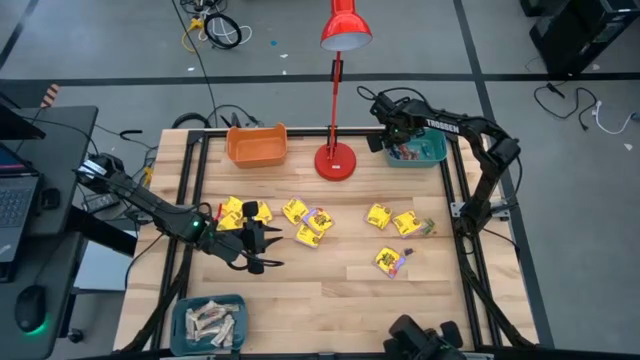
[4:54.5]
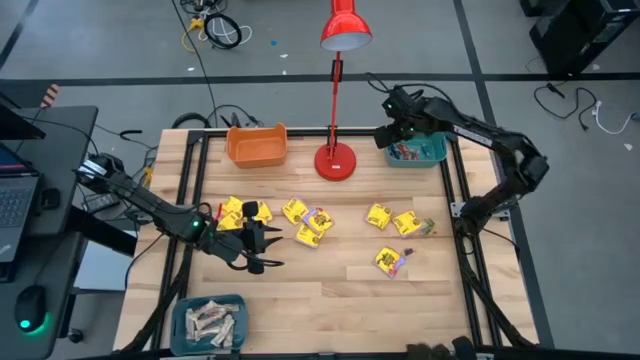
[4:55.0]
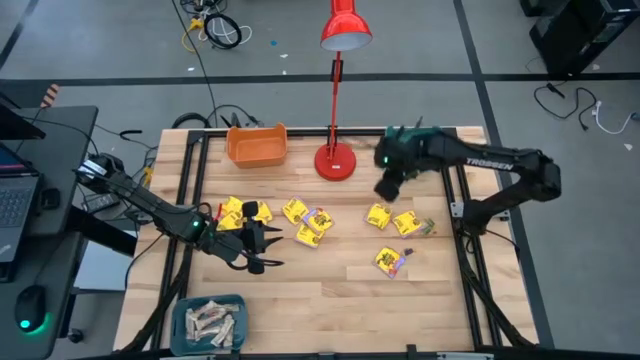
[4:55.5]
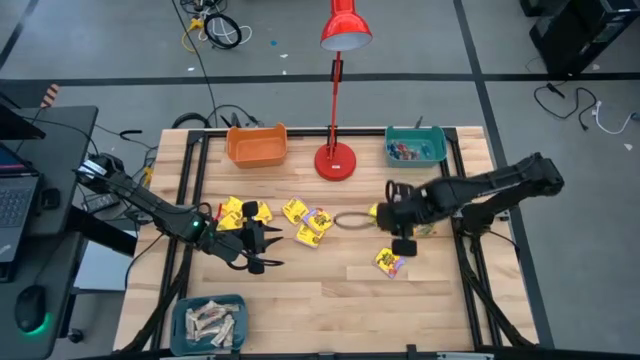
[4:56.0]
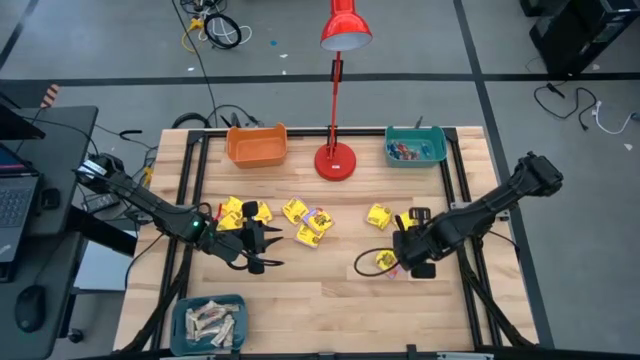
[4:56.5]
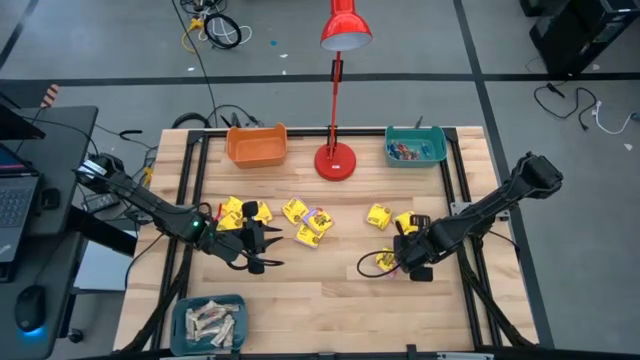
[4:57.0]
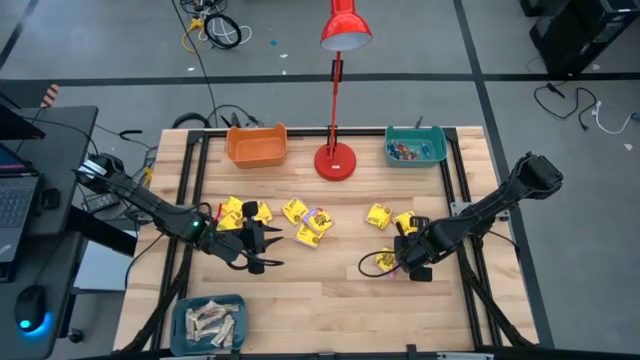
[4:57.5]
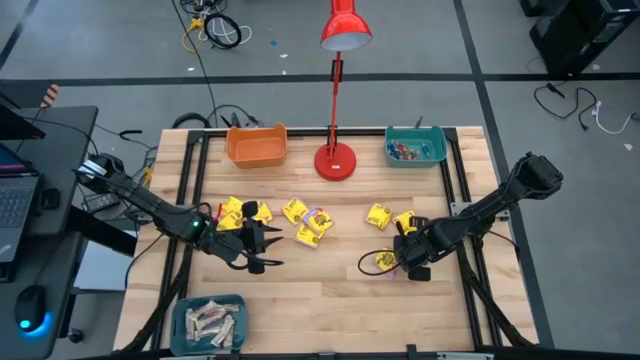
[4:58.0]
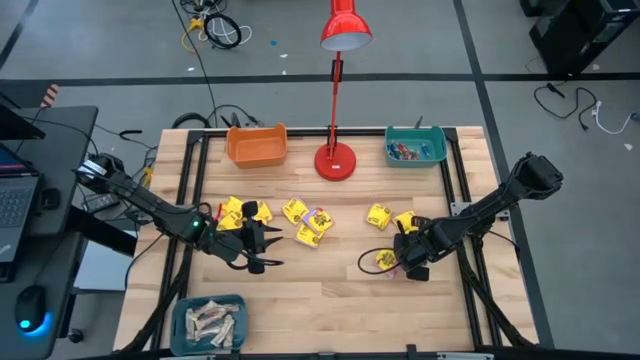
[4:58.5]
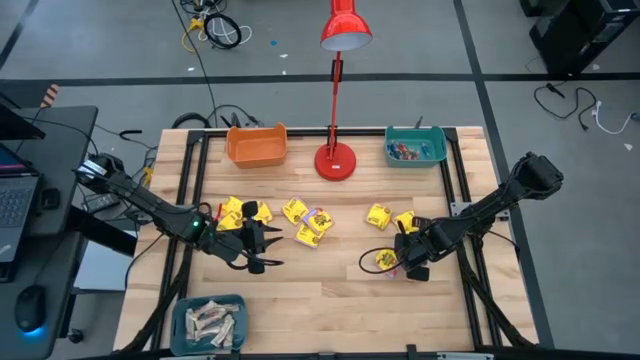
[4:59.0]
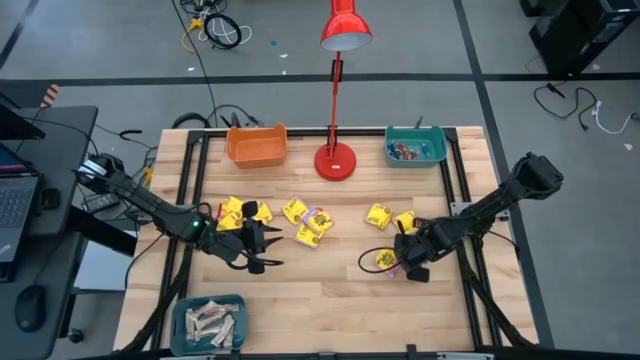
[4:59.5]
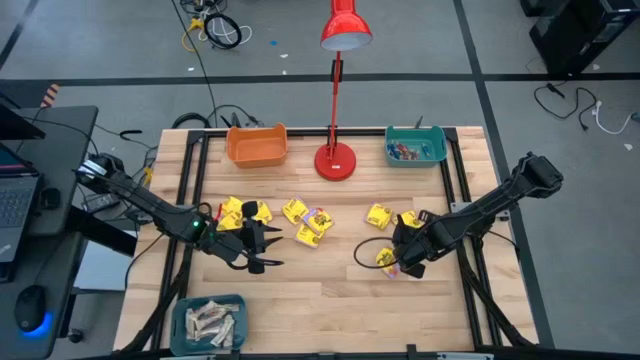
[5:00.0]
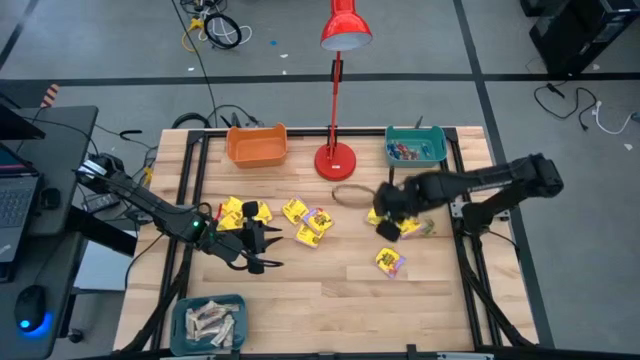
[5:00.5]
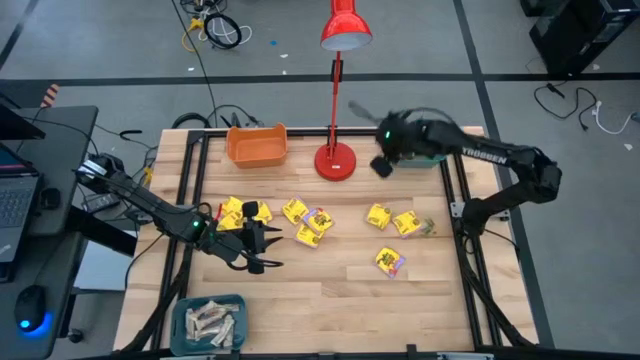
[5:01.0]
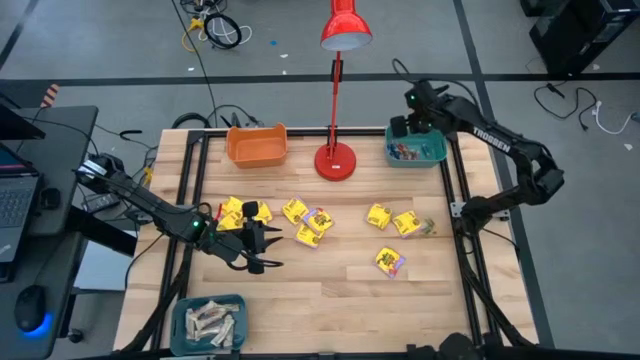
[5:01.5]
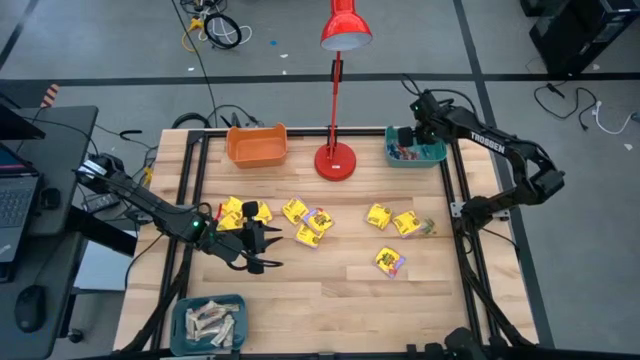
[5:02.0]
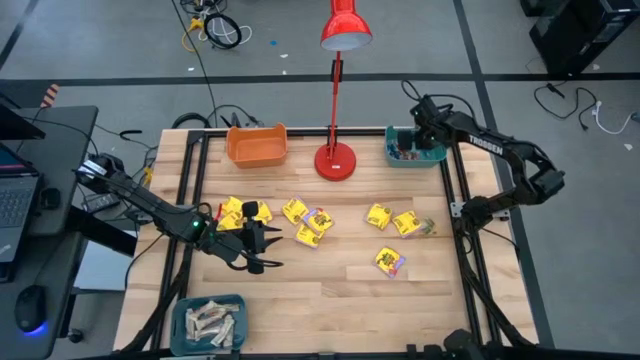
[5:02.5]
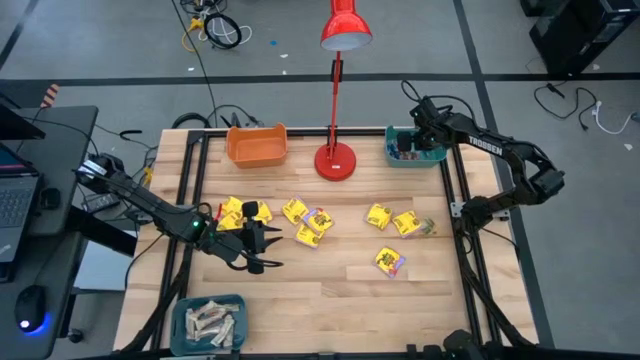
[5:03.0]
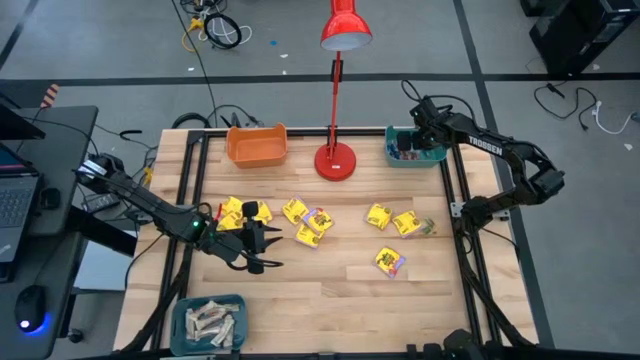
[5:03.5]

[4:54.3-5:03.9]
Task: Sort candy
Put the small violet candy into the green bin

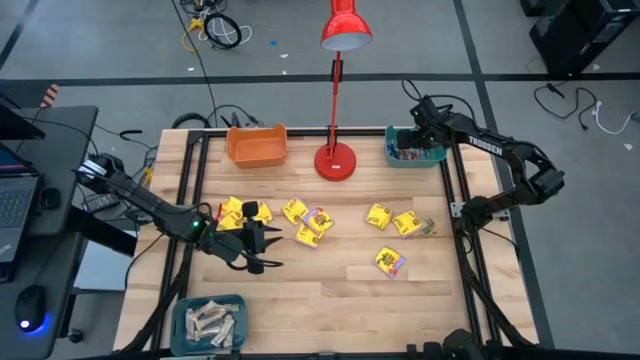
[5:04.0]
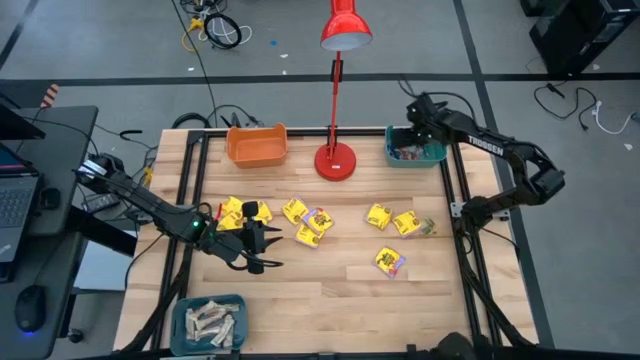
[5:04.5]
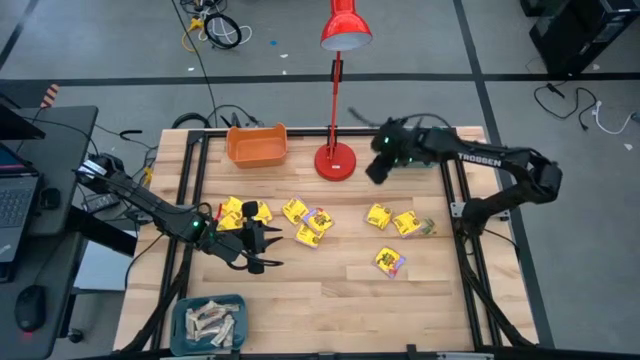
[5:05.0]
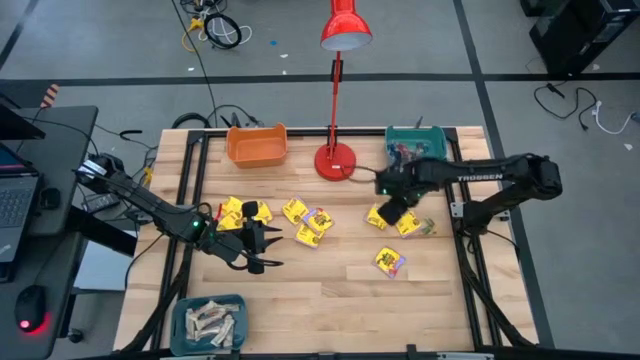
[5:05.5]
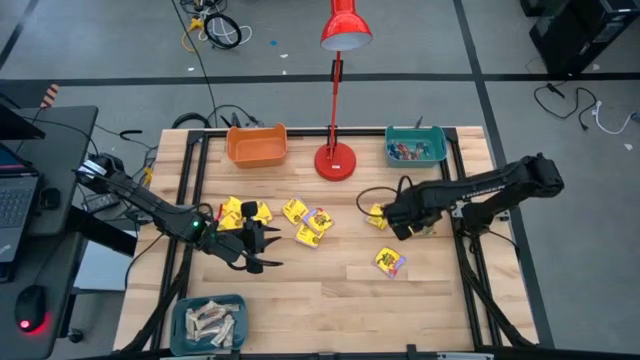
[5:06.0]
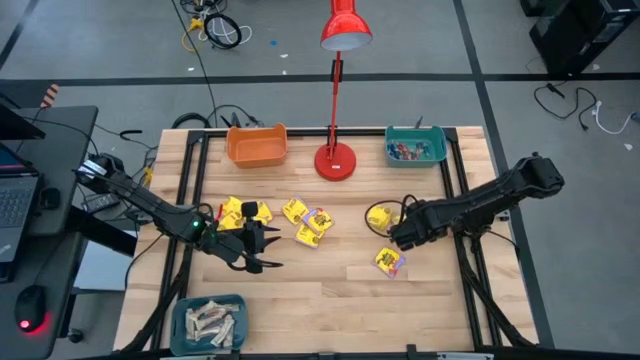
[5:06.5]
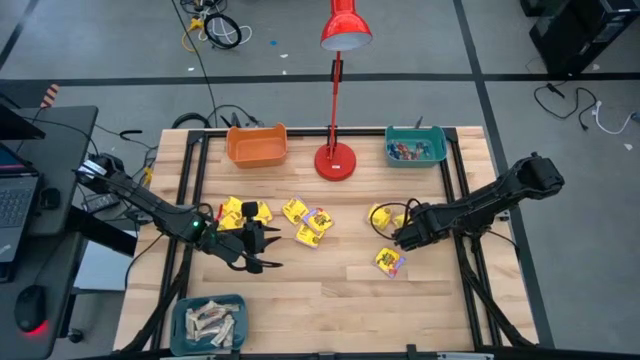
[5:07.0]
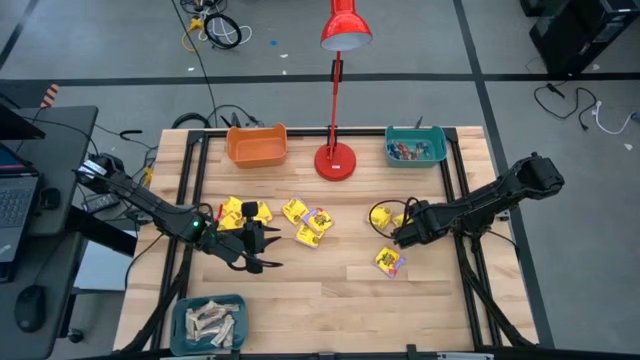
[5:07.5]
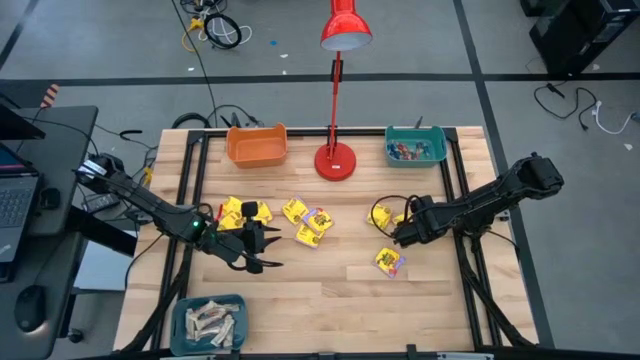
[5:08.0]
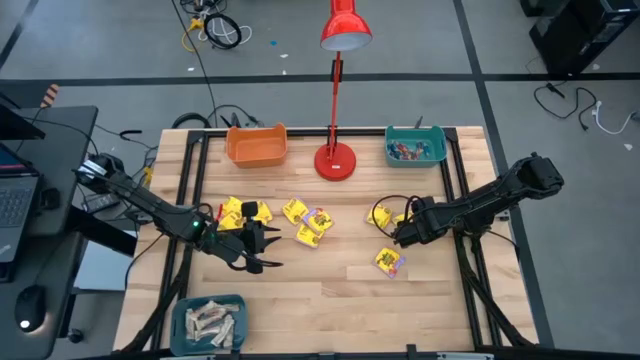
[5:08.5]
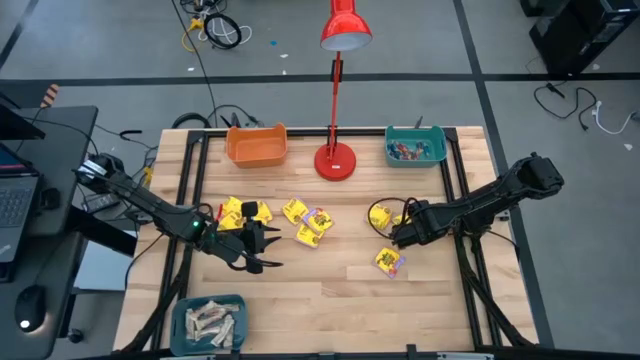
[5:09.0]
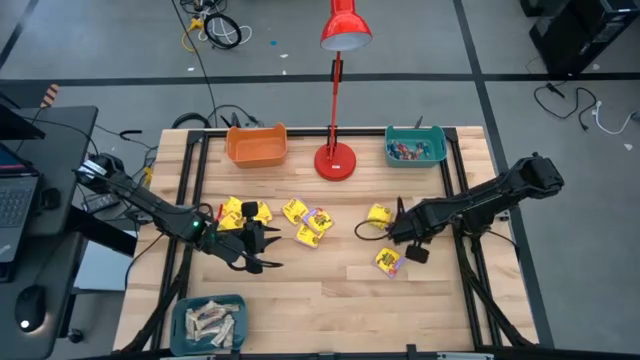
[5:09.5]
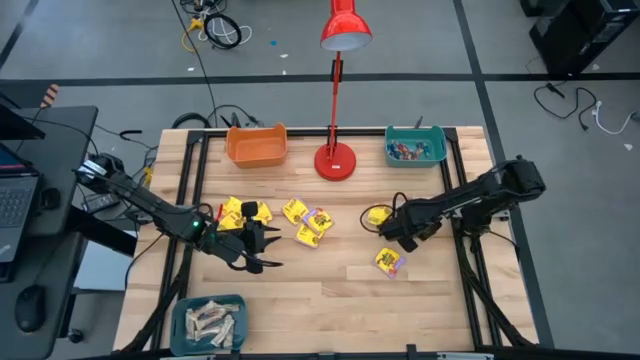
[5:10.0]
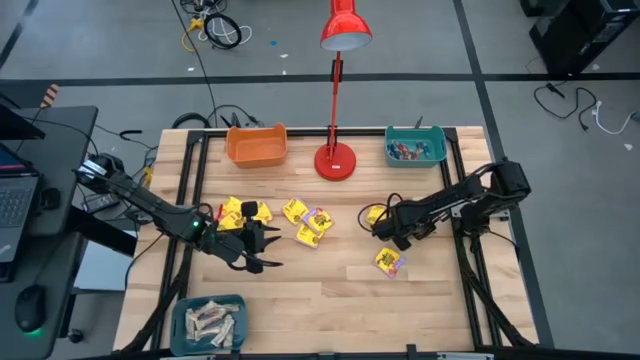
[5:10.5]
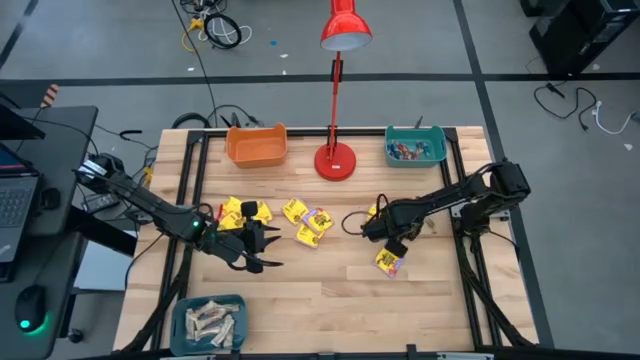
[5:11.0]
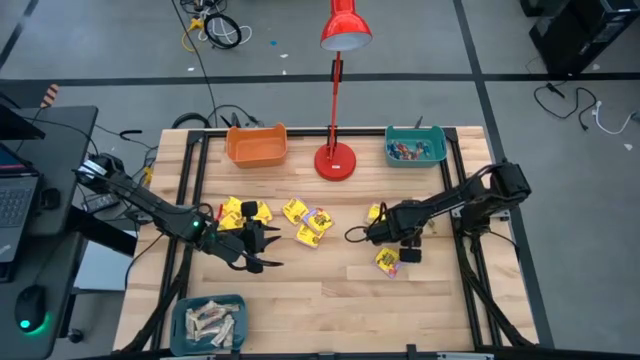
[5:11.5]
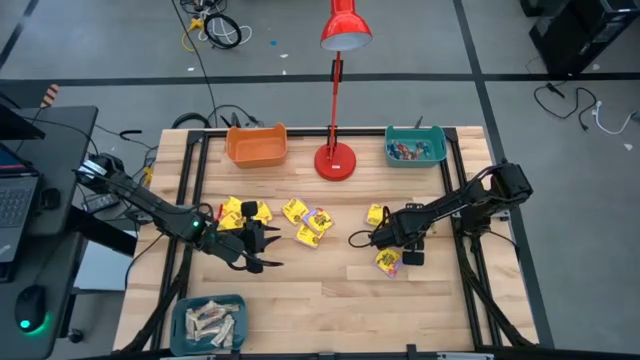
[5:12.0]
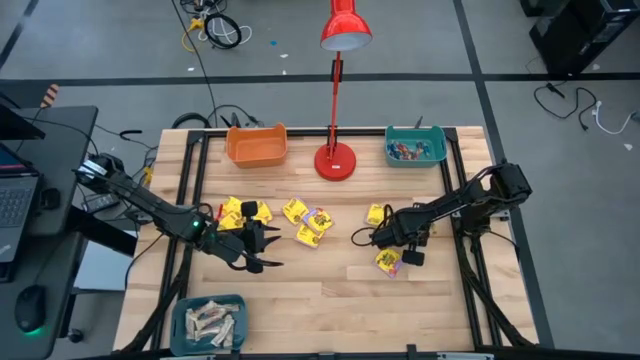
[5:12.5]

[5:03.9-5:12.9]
Put the small green candy into the green bin

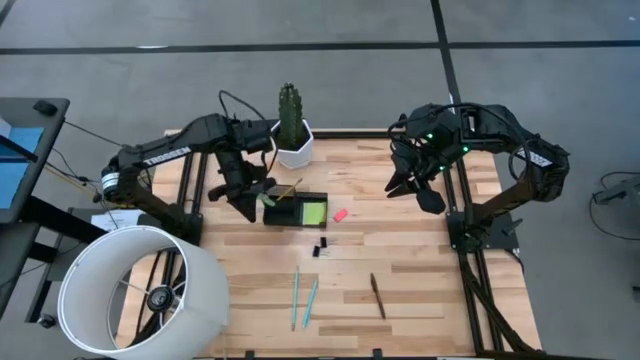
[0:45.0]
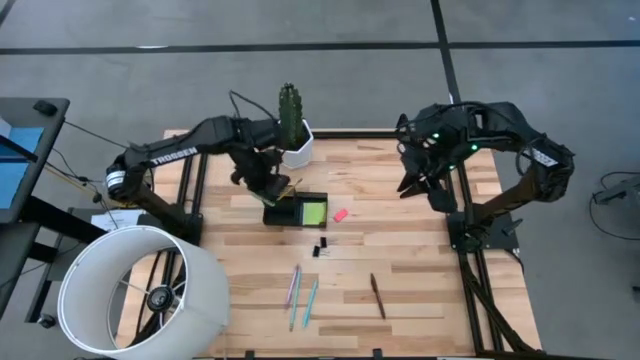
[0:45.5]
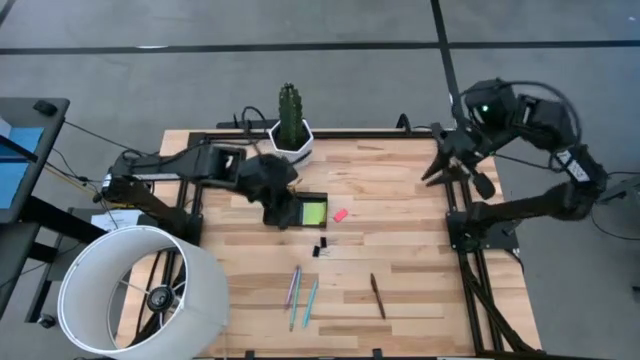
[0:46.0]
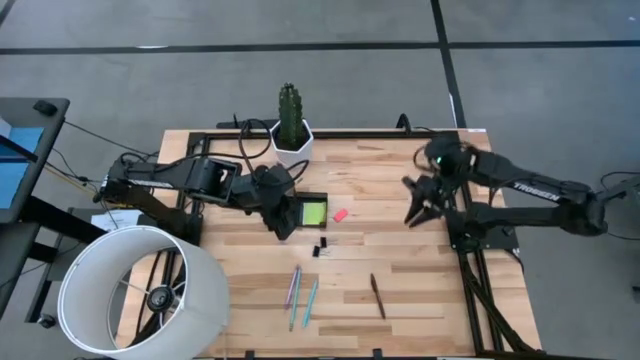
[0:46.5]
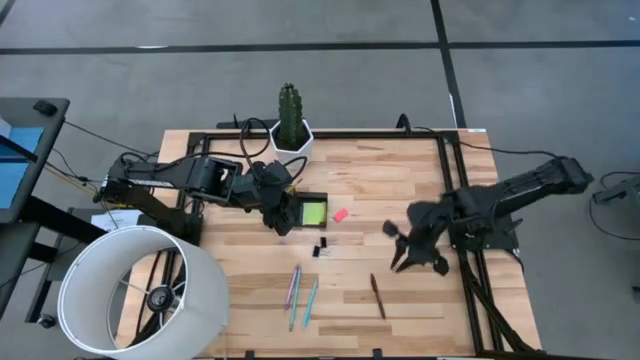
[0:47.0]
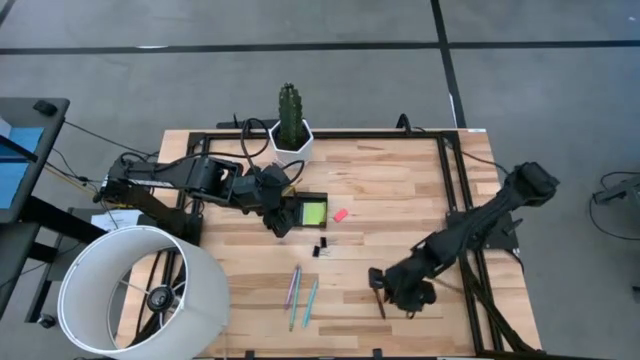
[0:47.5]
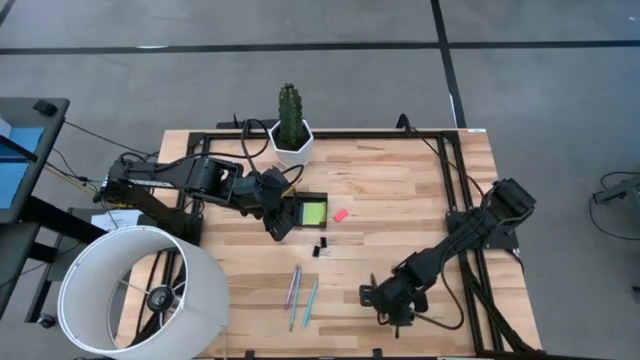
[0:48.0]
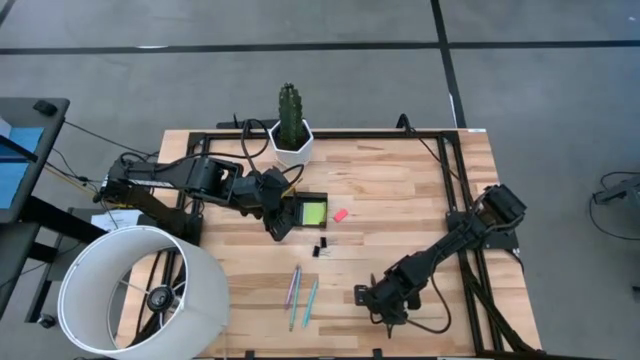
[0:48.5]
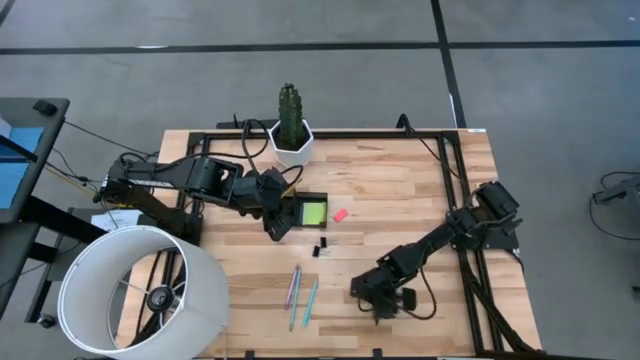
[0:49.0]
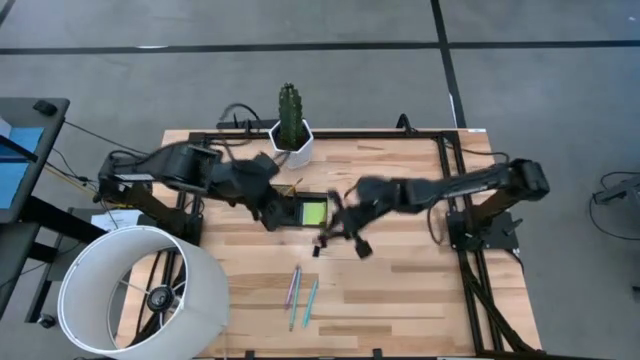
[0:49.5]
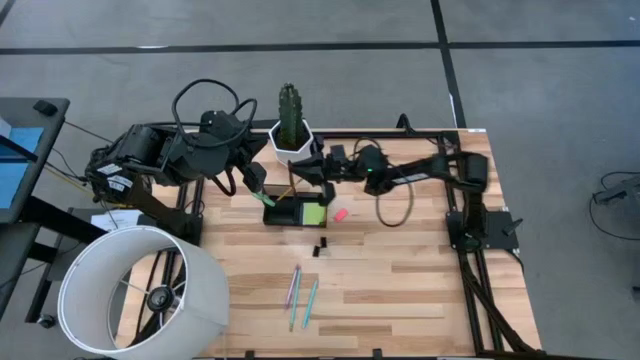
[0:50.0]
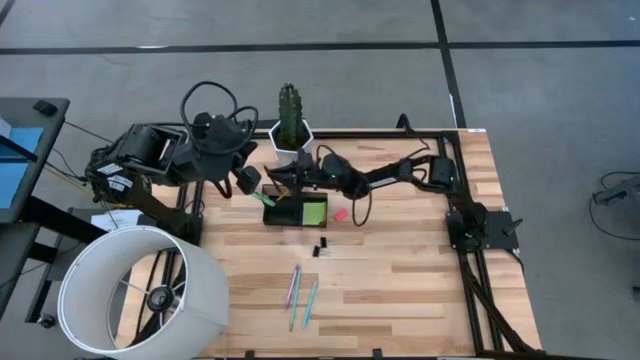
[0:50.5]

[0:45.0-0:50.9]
Task: Pick and place office supplies into organizer
Put the brown pen into the black mesh organizer
